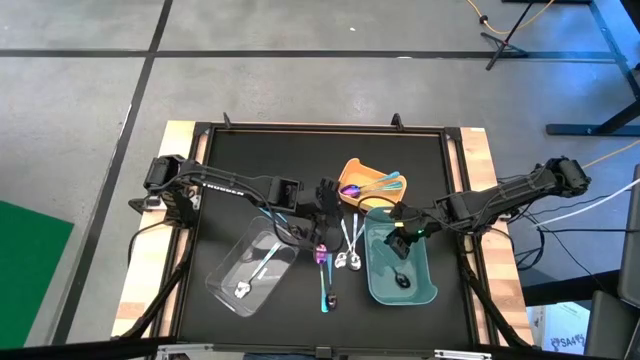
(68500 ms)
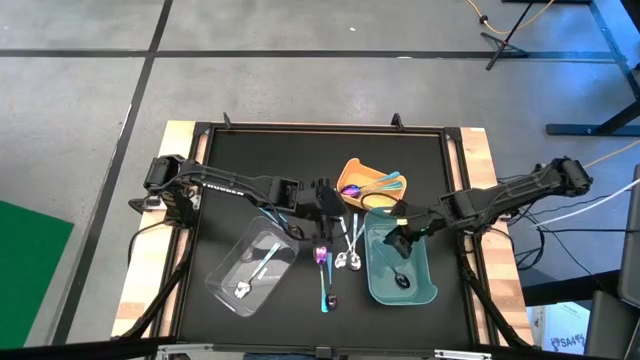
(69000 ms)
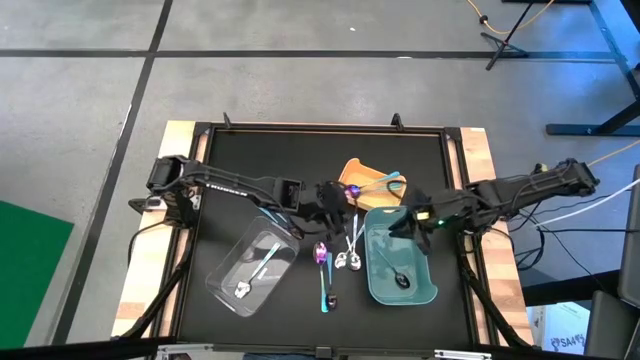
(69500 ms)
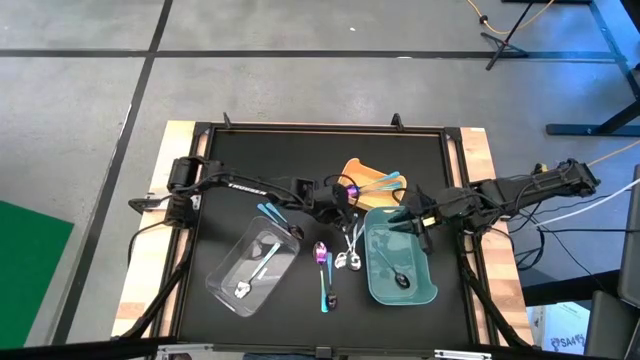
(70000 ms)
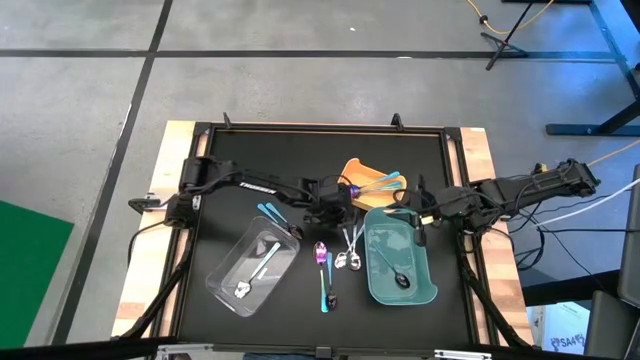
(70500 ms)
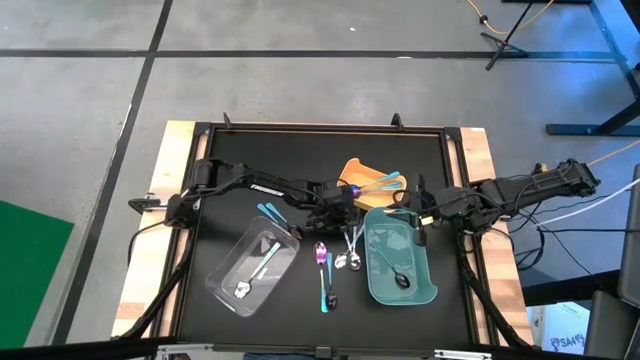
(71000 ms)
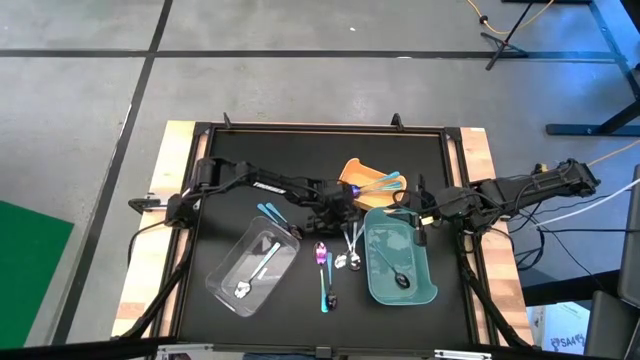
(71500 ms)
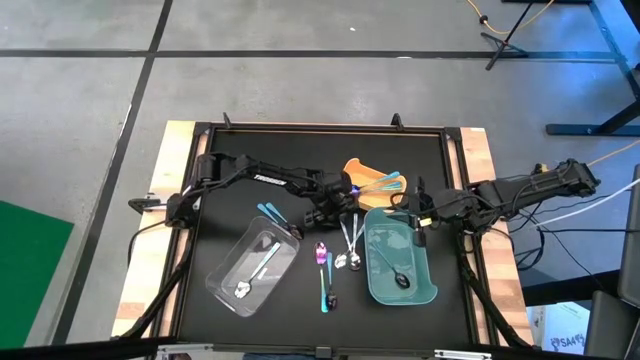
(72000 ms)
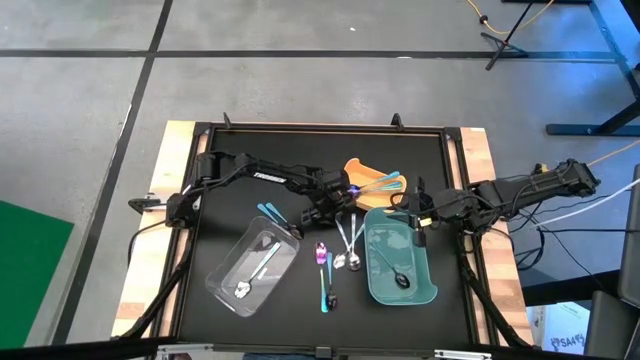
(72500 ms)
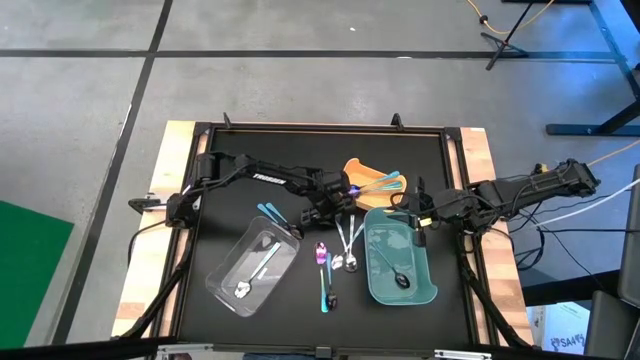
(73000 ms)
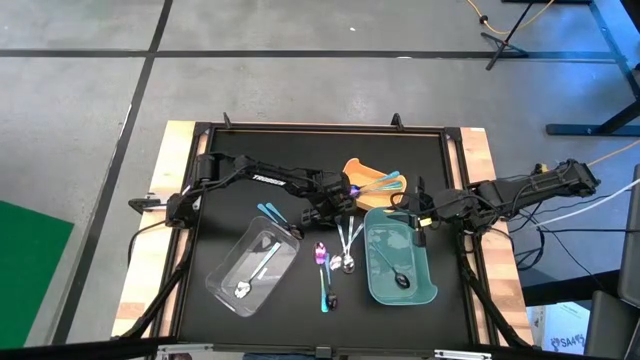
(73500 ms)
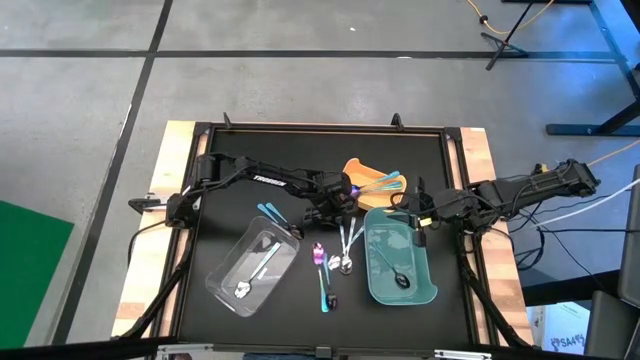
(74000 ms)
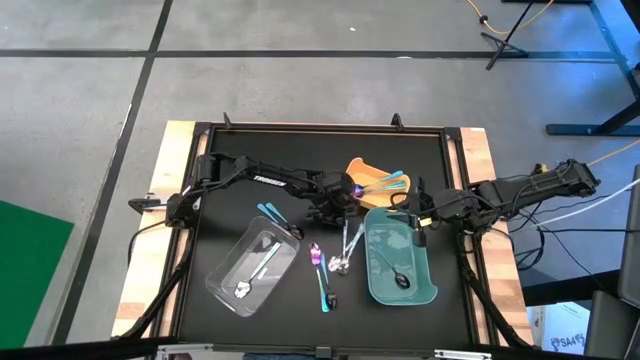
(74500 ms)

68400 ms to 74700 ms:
Task: Sort silverware by color (type)
Put the white patterned spoon into the transparent bin

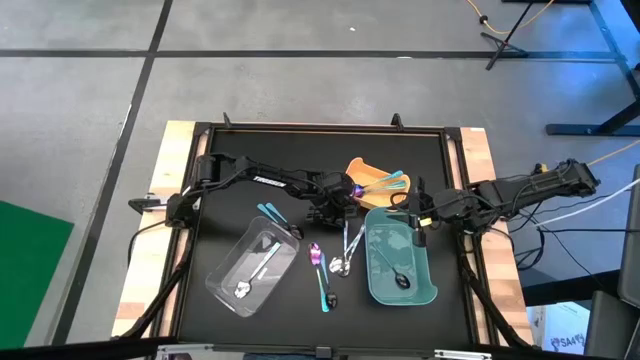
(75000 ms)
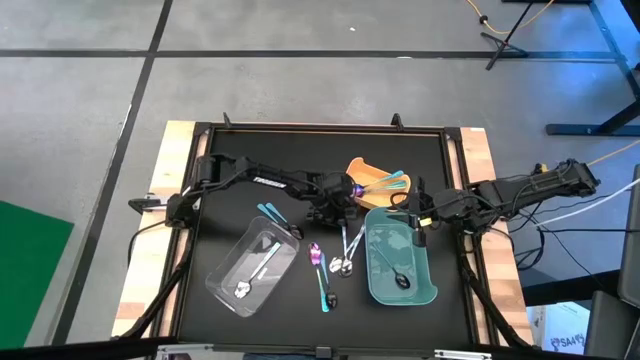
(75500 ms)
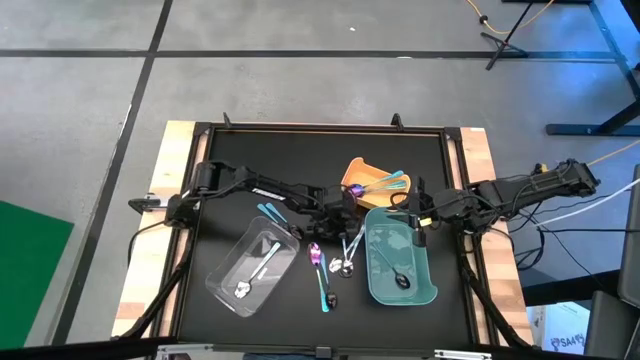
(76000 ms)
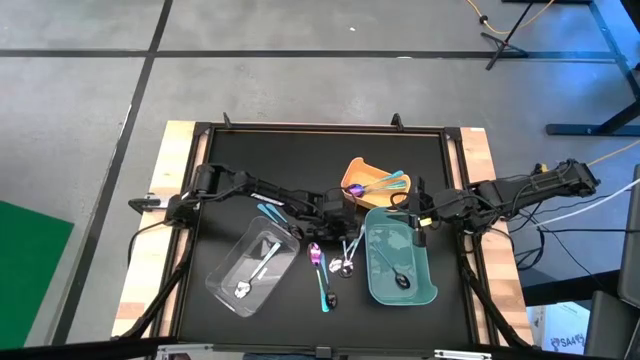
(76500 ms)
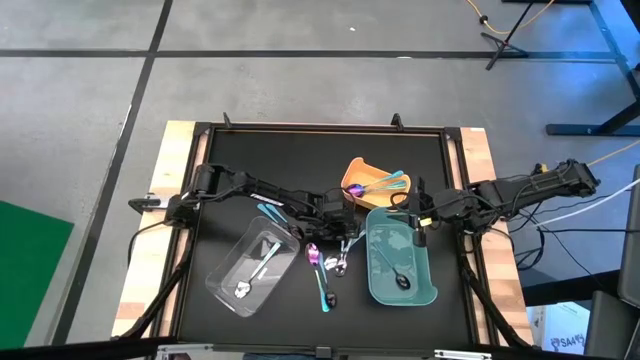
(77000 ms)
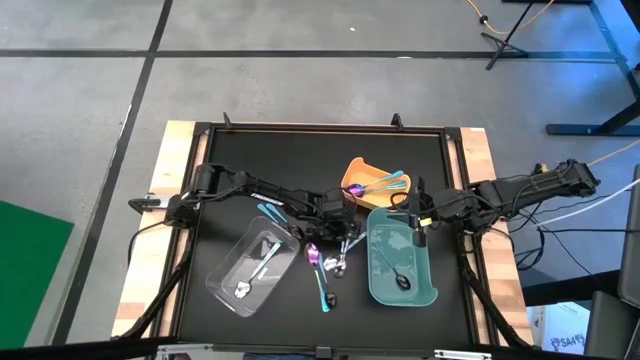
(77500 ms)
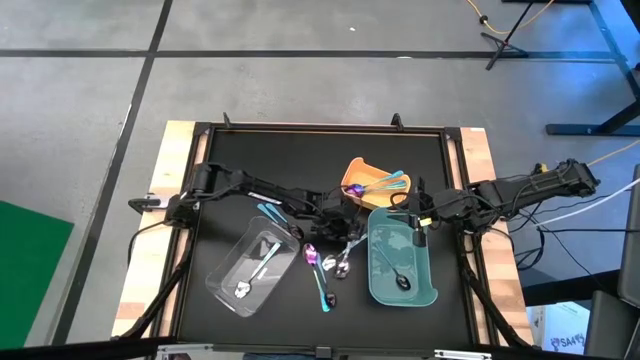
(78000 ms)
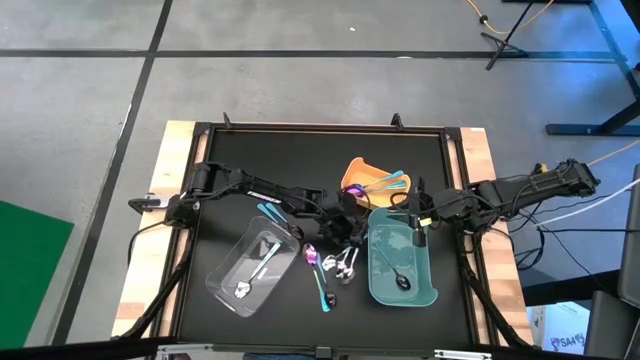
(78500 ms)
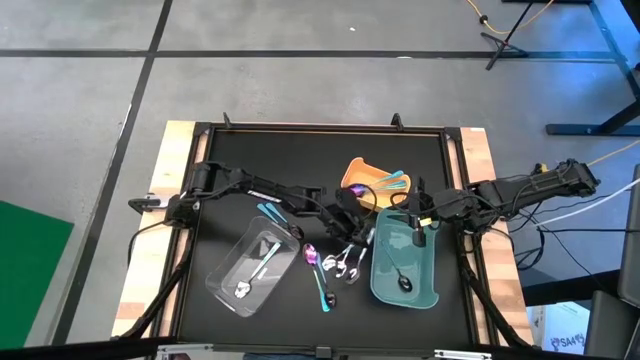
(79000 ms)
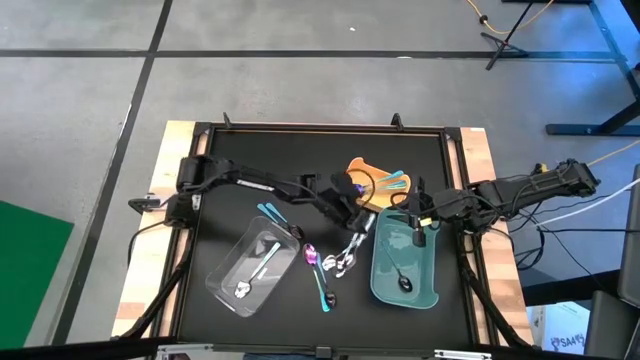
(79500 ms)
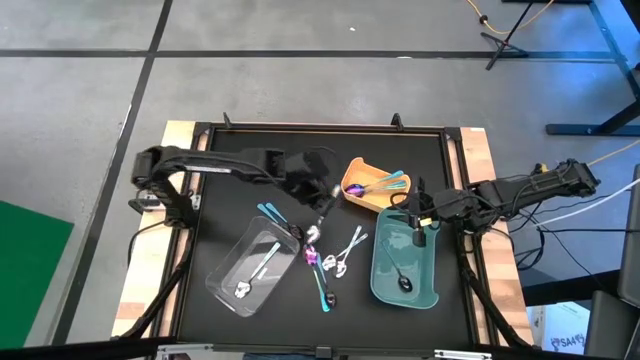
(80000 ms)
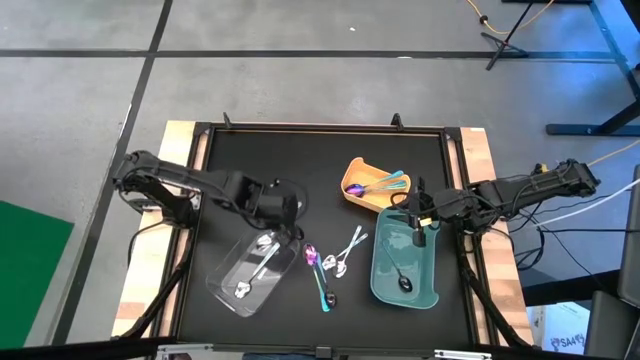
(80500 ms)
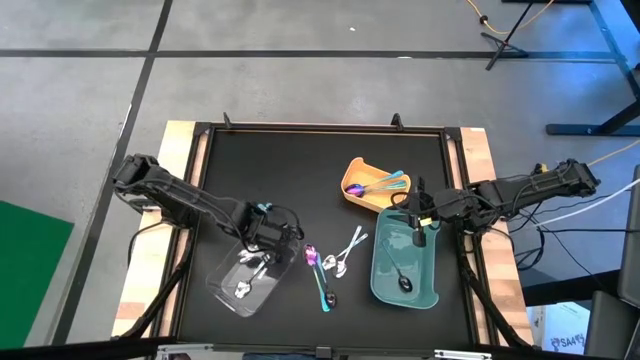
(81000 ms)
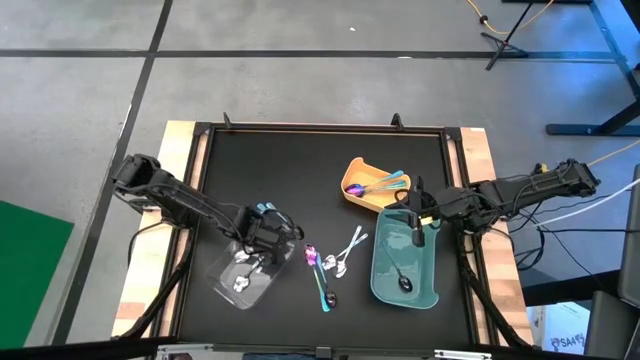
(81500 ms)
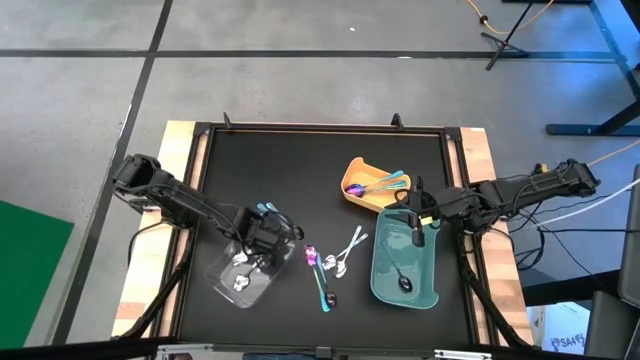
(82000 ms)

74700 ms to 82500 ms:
Put the white patterned spoon into the transparent bin

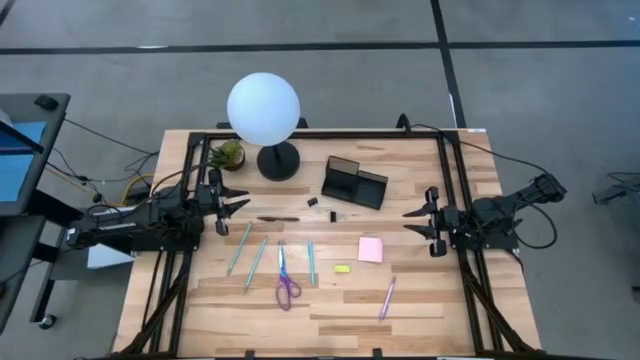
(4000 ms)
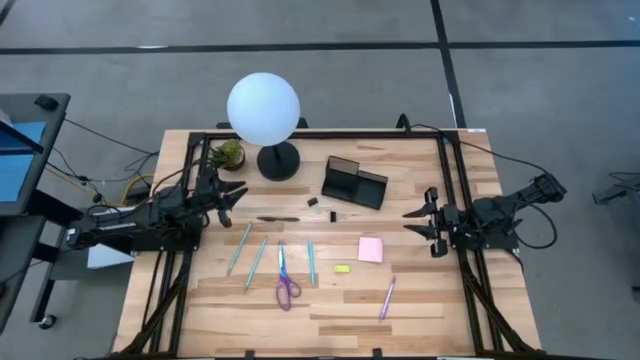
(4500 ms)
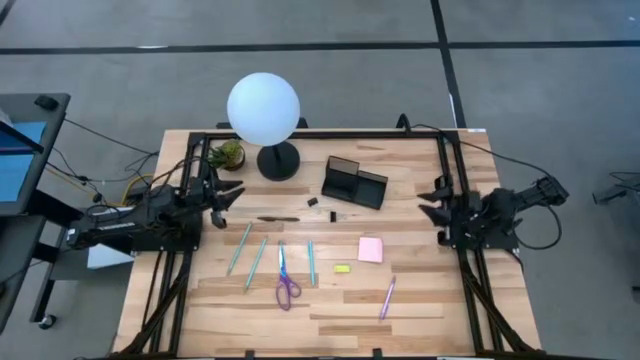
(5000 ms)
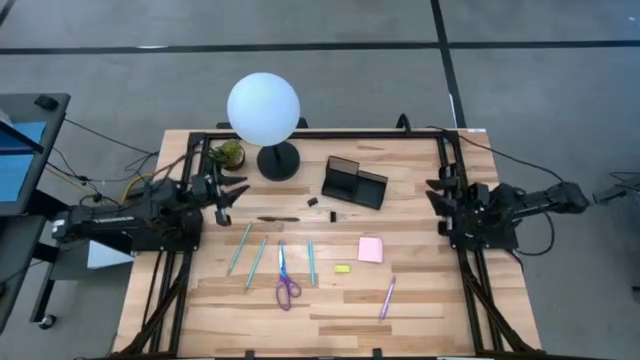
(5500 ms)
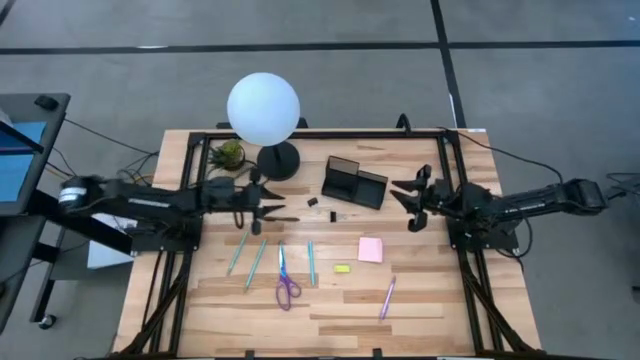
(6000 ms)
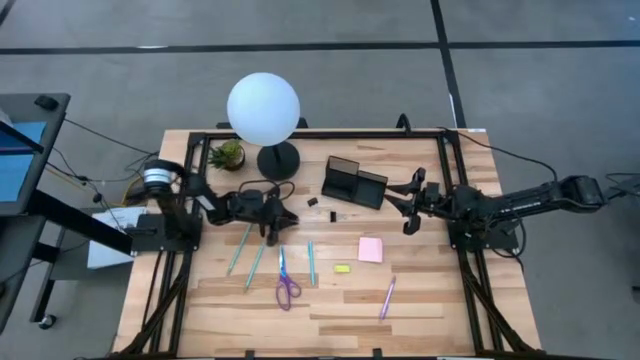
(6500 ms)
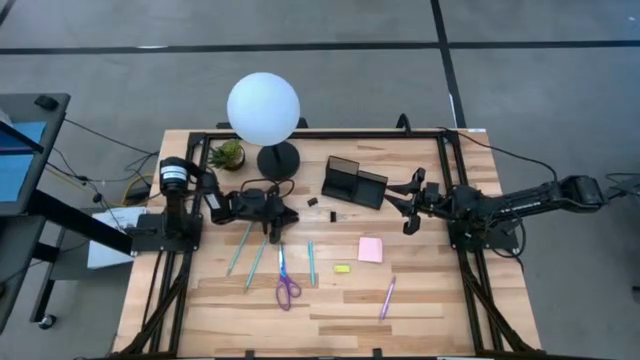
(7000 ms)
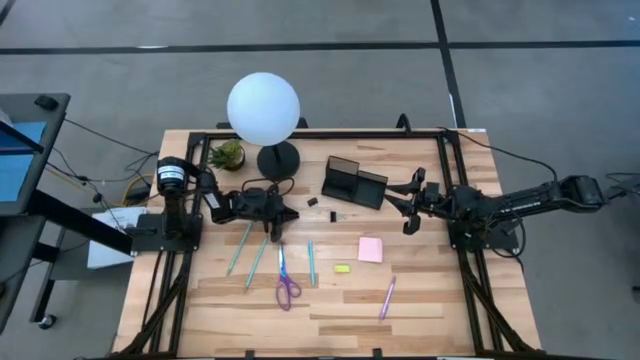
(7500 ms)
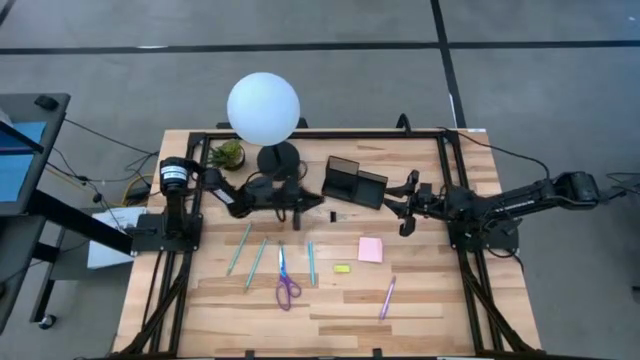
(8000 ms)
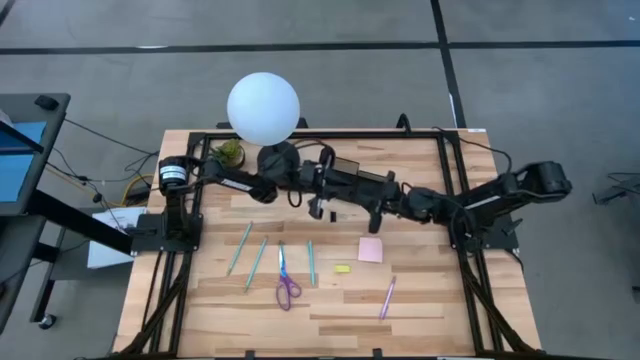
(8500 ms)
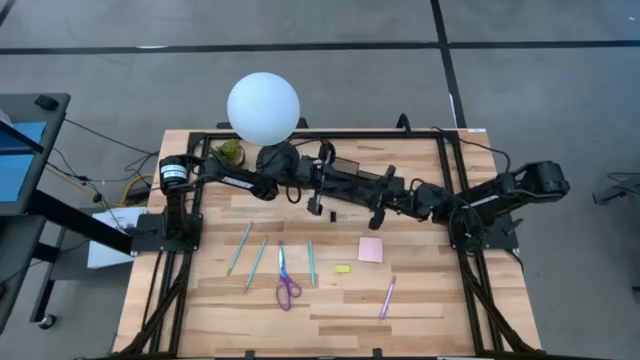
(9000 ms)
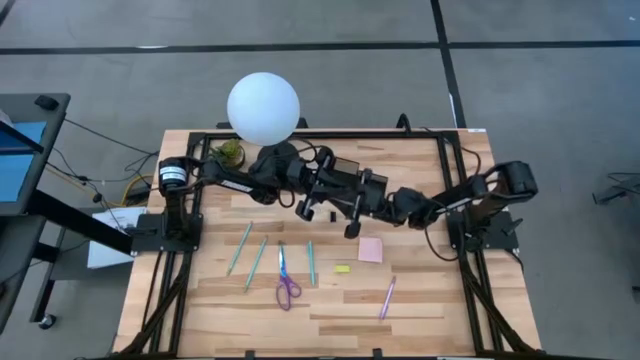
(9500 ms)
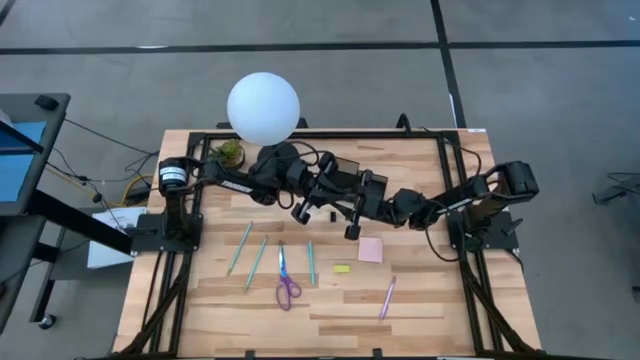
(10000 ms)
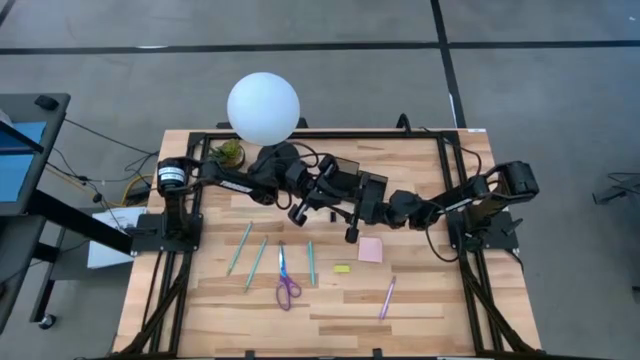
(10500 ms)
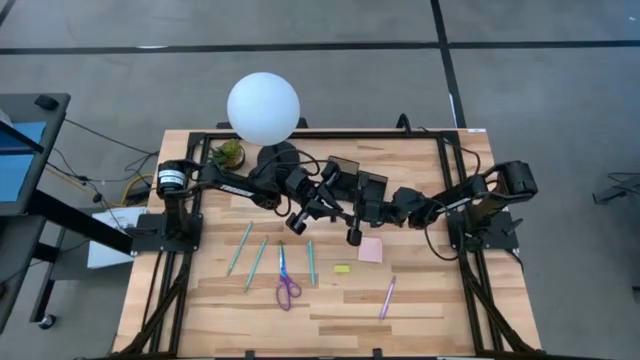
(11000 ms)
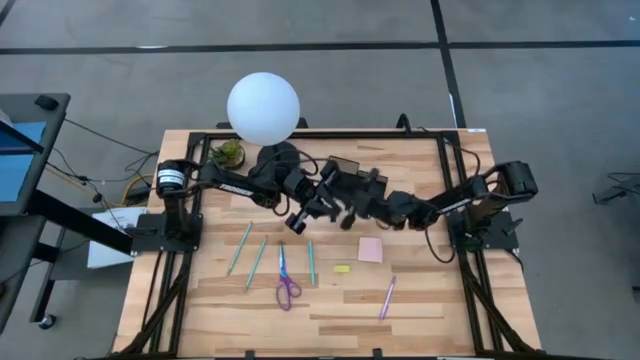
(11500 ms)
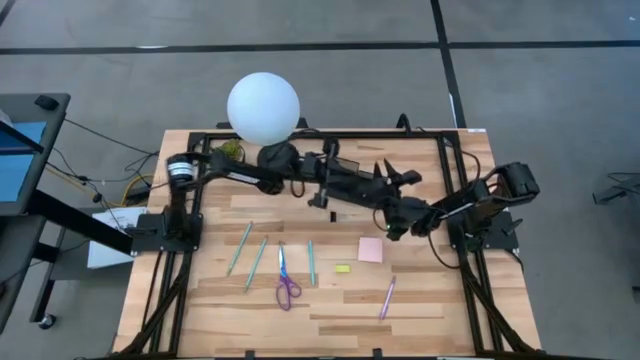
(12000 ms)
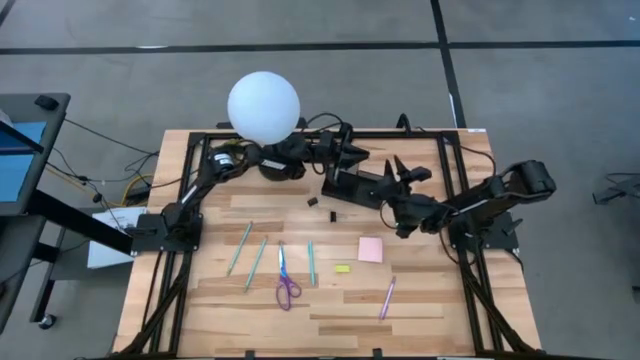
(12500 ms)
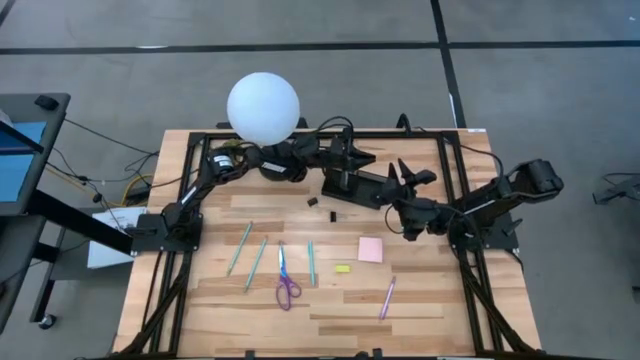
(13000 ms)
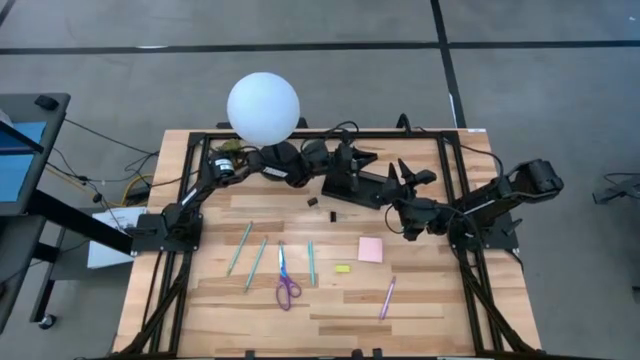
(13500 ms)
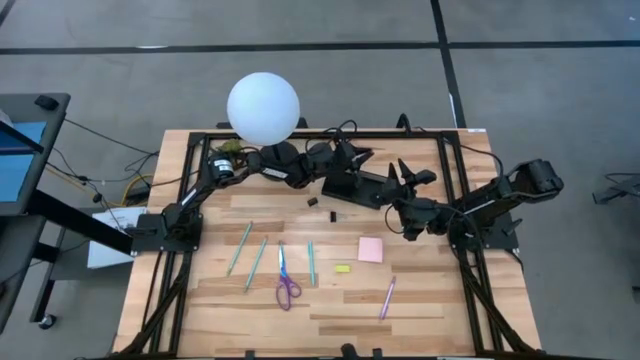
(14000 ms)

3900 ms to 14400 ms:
Task: Pick and place office supplies into organizer
Put the brown pen into the black desk organizer
